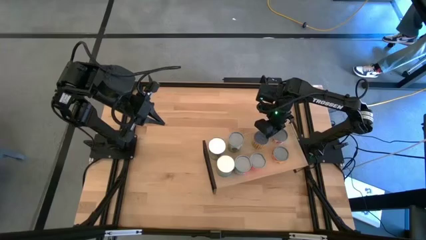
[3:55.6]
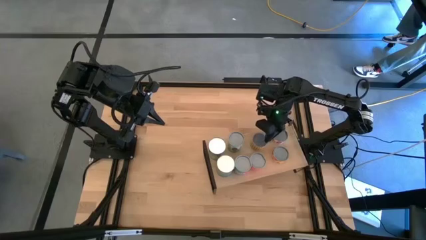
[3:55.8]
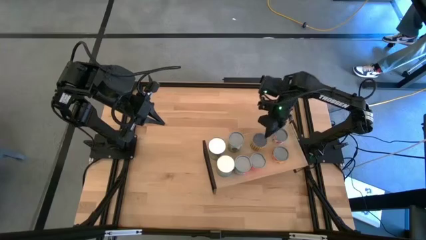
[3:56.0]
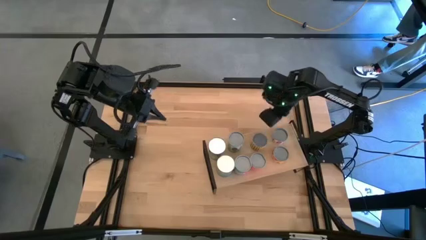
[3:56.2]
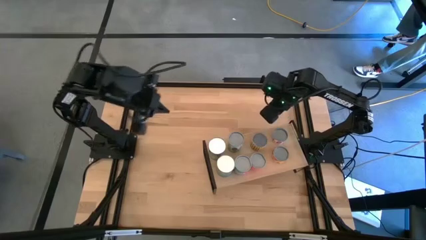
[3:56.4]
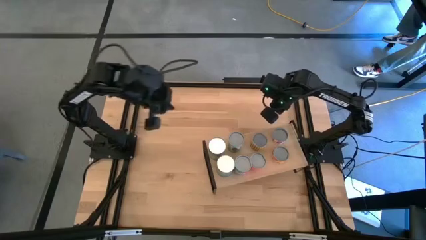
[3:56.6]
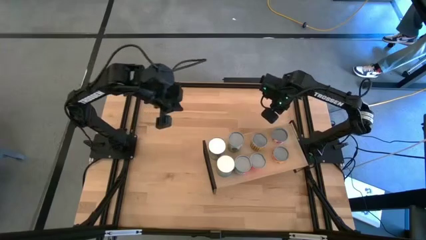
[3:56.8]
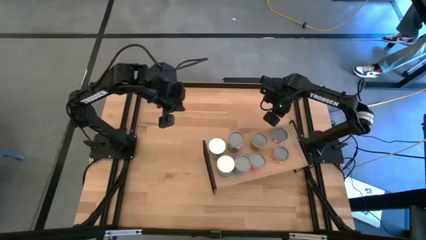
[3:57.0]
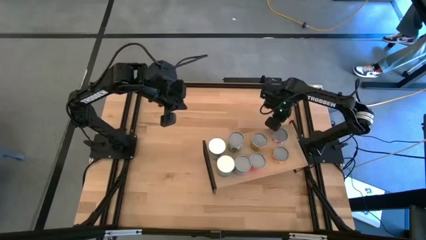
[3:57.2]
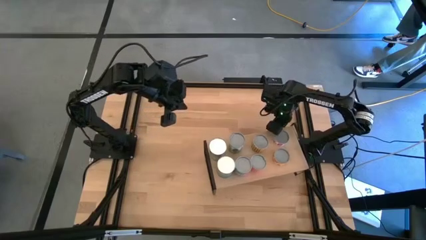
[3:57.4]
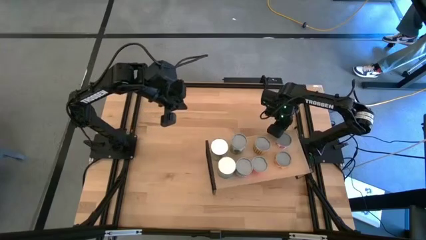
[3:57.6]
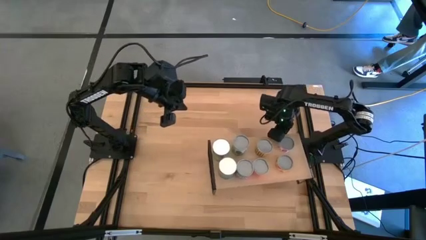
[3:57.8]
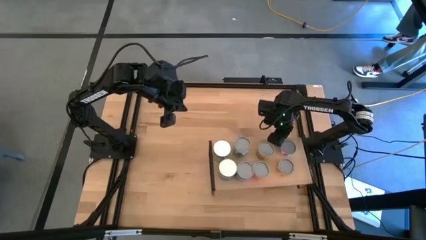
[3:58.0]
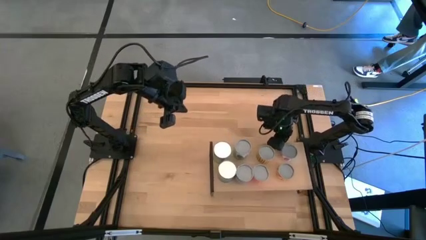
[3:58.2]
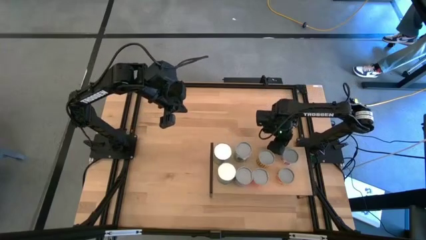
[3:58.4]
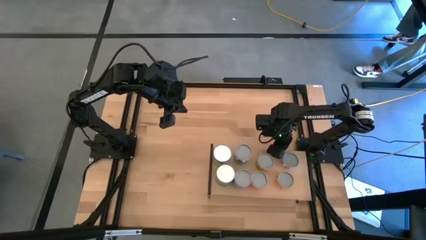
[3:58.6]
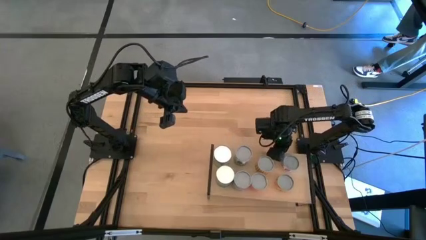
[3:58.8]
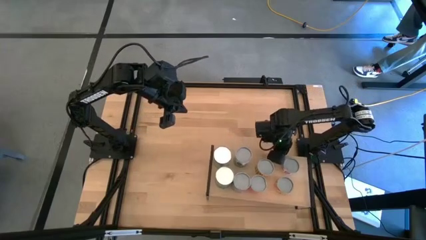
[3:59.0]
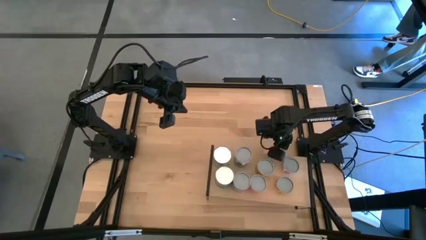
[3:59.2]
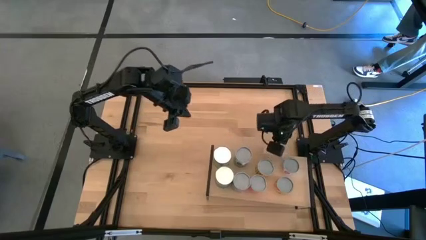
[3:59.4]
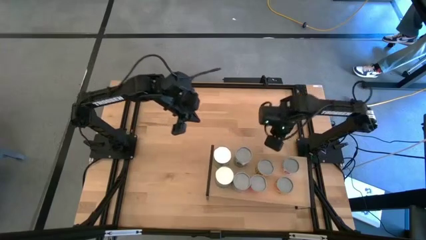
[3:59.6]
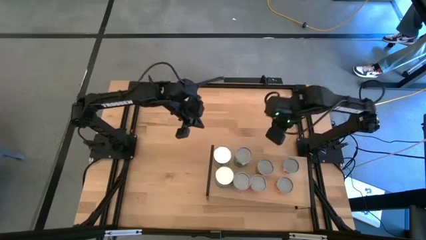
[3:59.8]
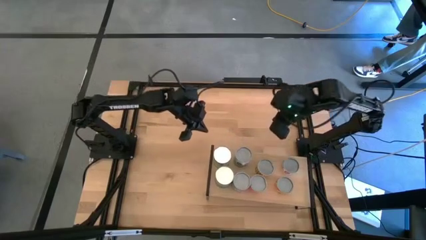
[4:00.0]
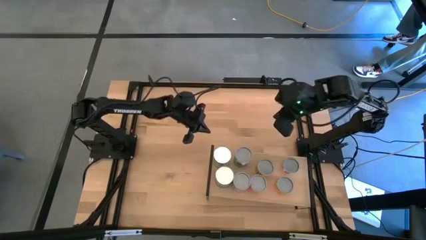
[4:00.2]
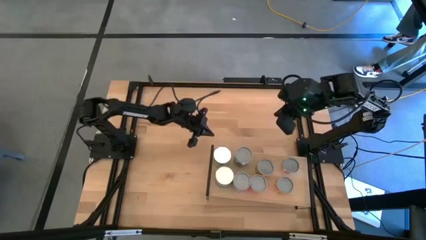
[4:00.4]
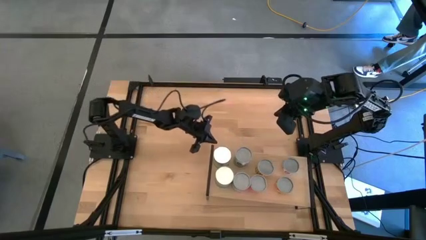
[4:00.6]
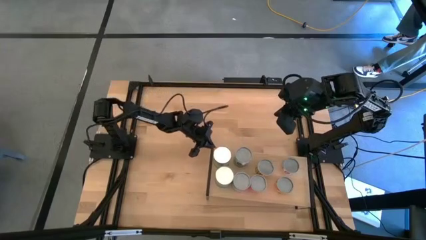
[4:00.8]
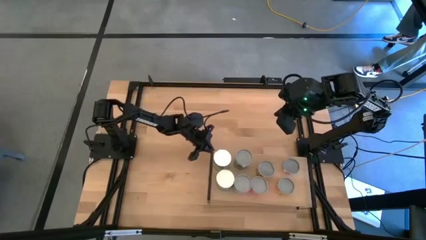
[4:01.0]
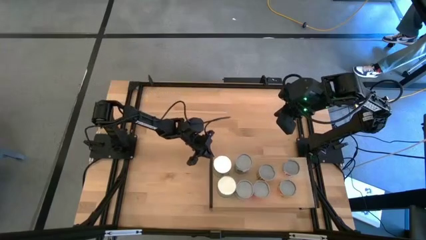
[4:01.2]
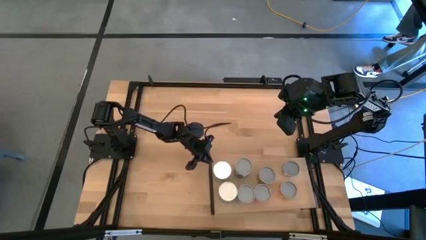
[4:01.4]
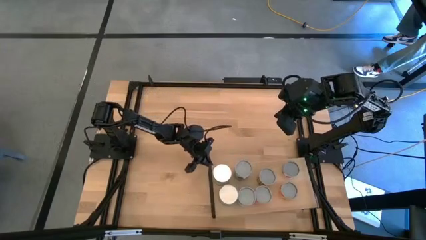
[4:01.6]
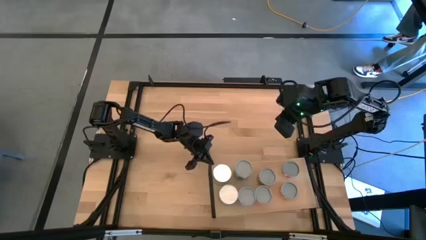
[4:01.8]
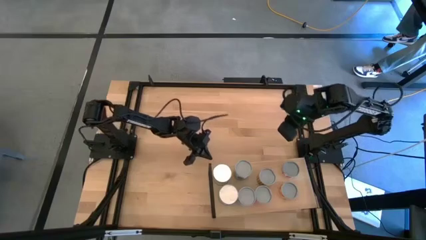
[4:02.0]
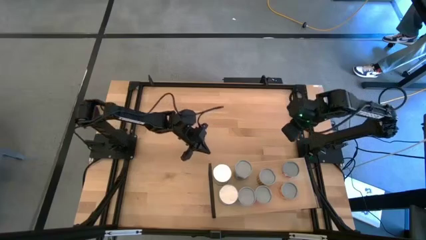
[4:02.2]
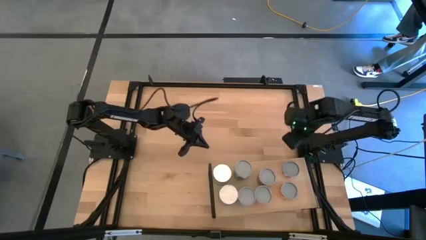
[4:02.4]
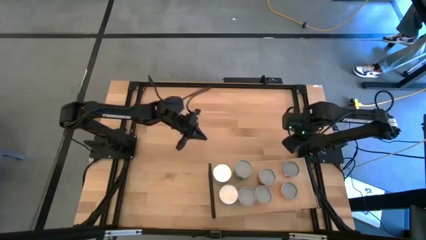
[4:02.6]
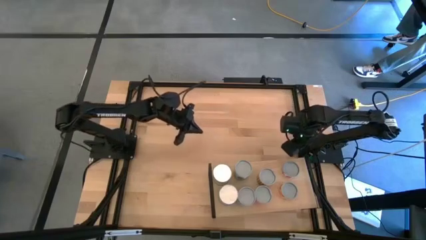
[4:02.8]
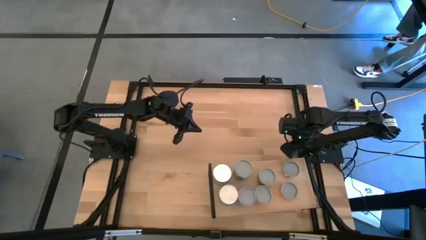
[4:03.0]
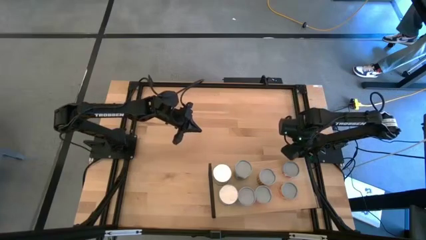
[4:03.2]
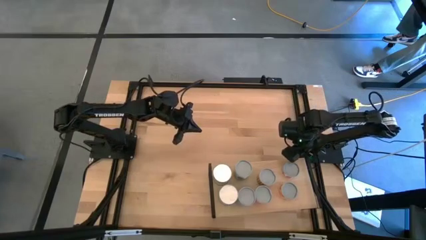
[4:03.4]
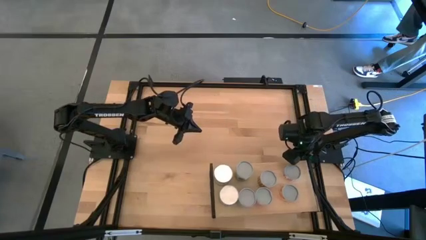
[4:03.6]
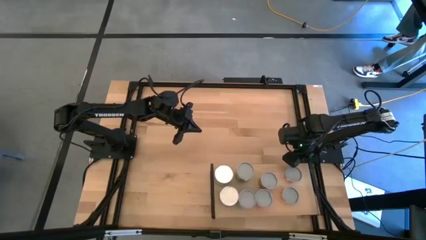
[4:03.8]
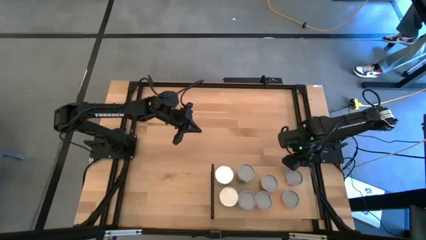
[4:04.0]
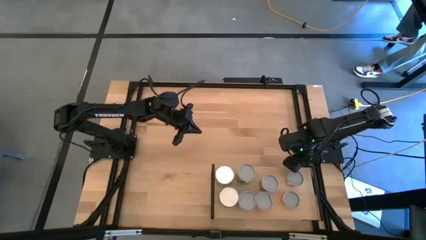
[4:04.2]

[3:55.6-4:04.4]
Task: Pick and place cans onto a shelf
Adjust the shelf

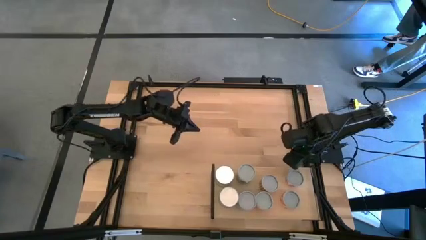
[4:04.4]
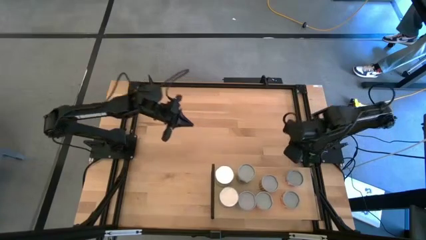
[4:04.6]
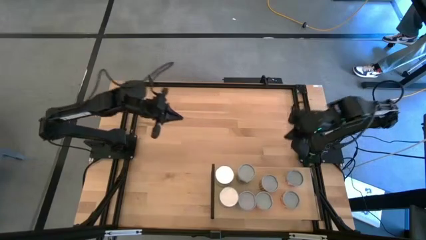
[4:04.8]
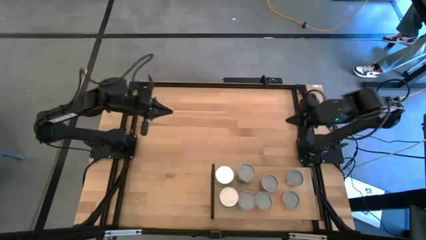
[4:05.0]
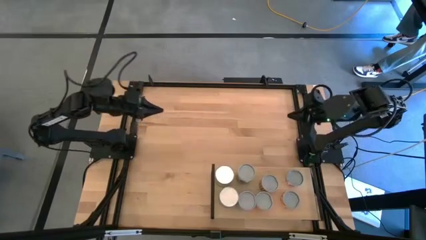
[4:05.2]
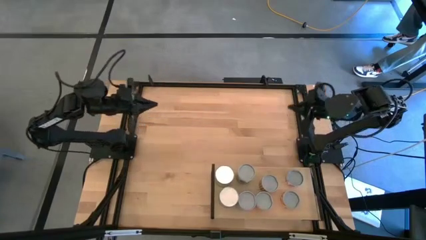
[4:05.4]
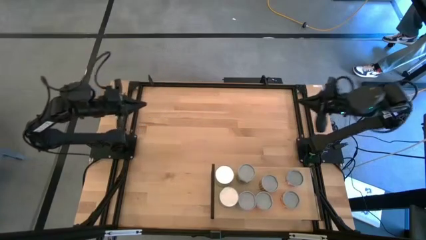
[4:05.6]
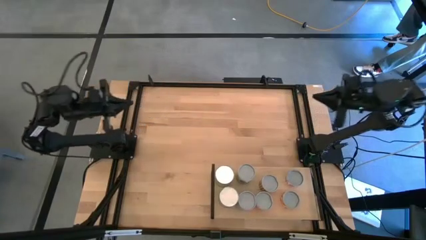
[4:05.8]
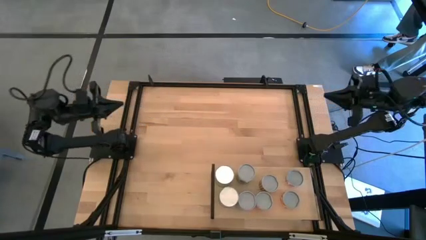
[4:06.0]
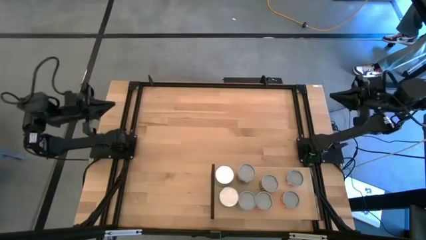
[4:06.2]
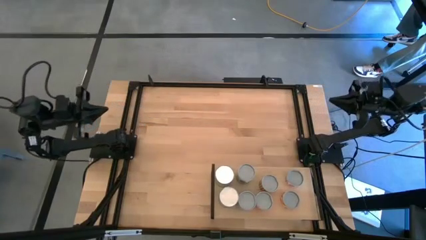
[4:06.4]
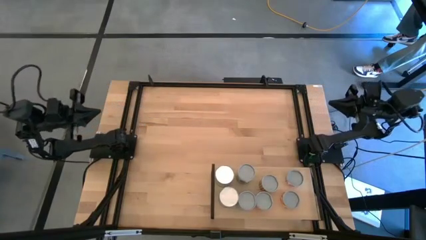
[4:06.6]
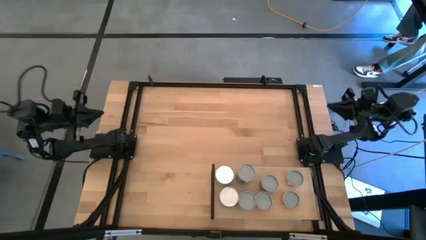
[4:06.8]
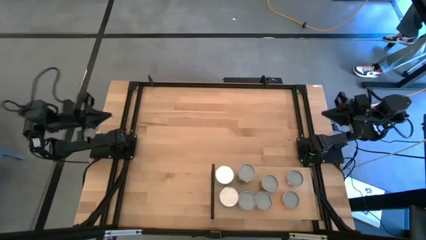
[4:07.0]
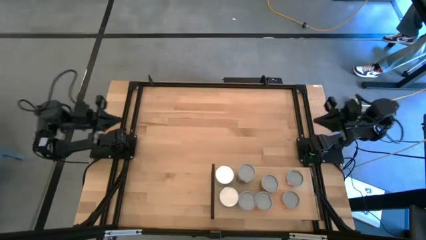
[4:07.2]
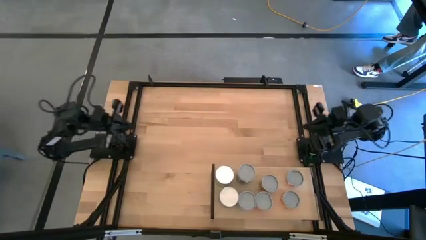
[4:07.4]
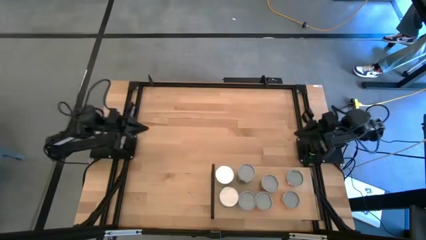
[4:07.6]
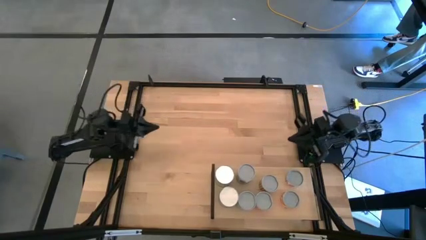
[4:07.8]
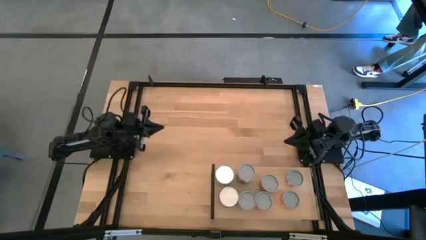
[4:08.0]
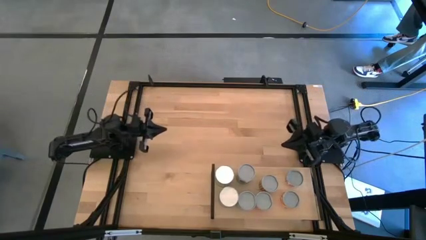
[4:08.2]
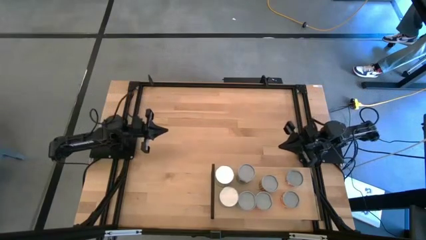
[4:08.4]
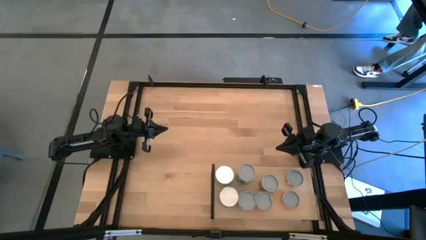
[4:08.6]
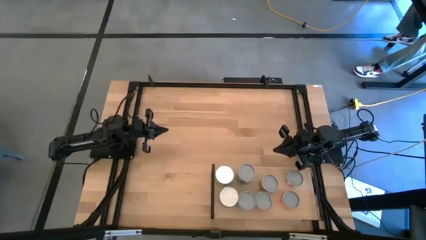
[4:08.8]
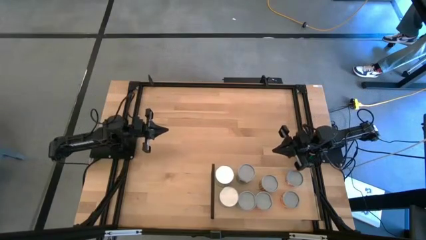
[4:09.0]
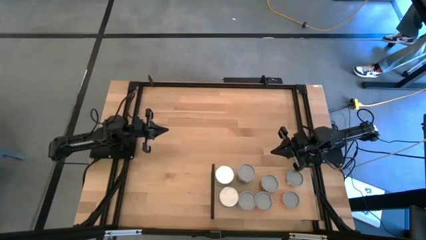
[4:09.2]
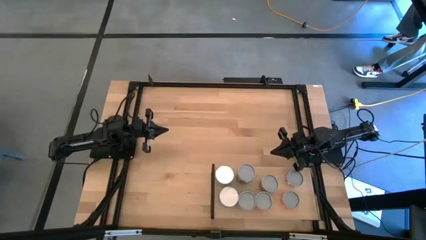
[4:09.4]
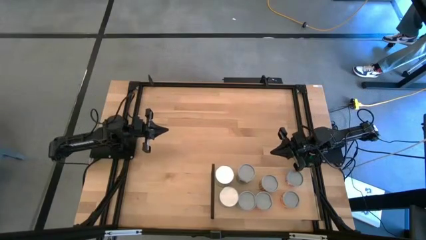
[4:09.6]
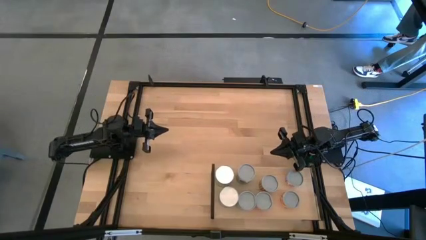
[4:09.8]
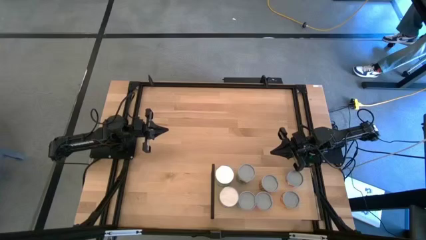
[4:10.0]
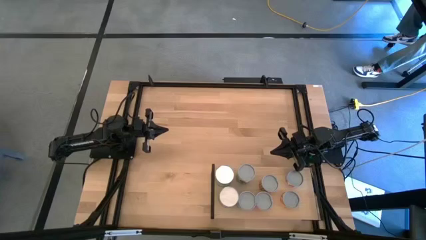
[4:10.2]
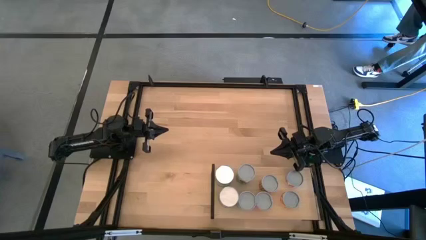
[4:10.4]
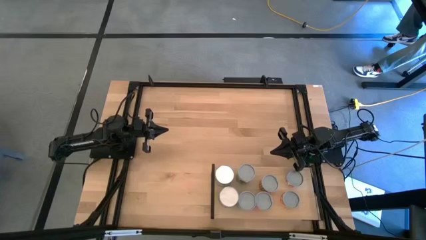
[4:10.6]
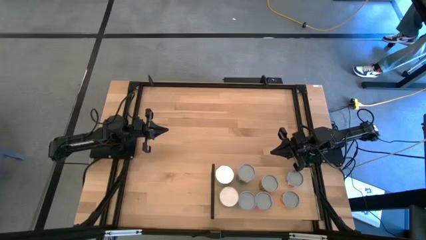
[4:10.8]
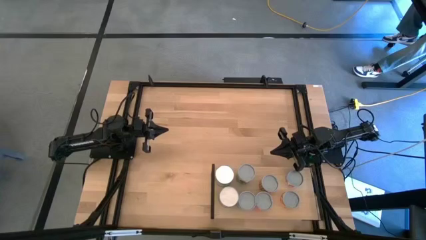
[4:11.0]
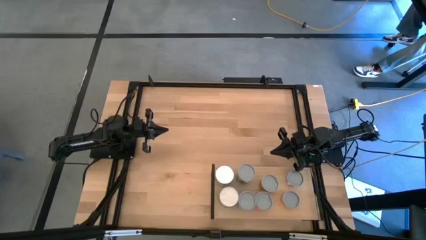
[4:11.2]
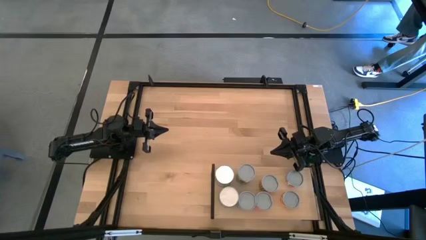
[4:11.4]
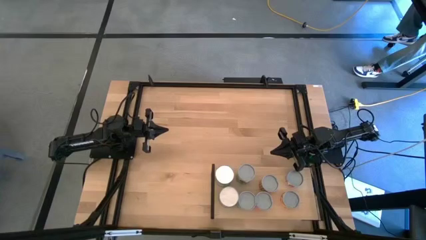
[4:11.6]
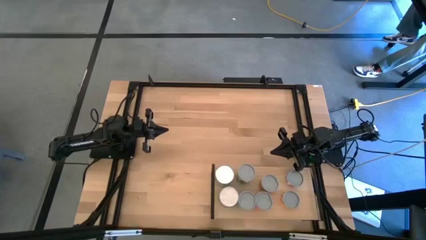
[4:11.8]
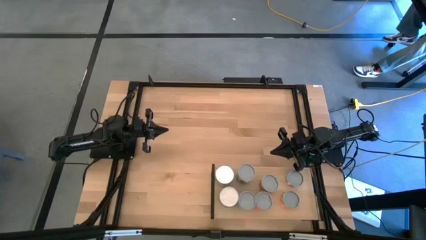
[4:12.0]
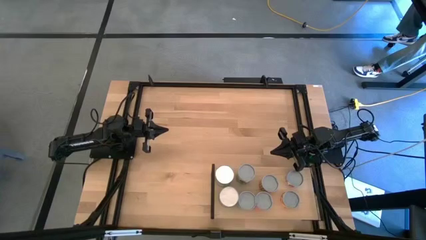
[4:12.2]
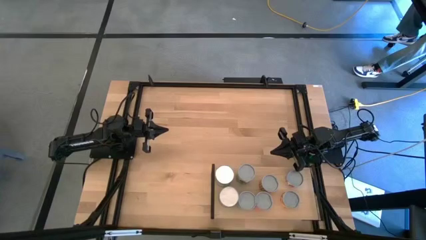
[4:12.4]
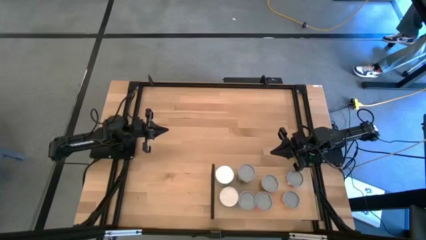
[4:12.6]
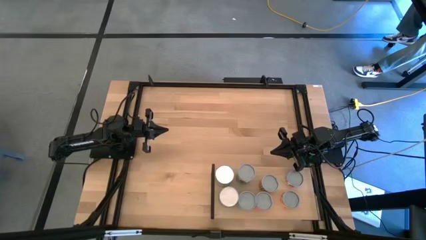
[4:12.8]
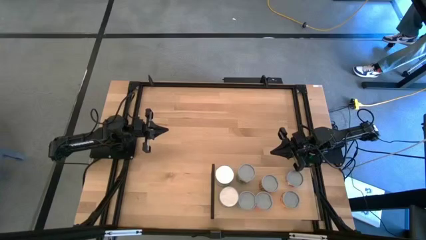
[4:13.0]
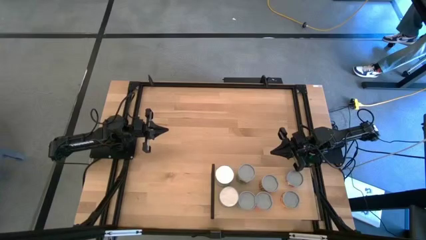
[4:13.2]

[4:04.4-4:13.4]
Return to Home Position
